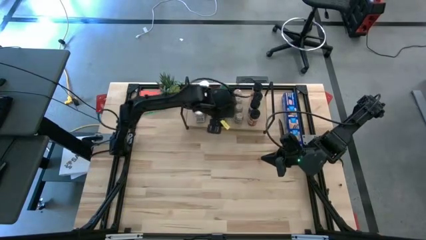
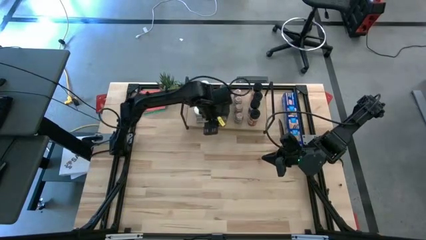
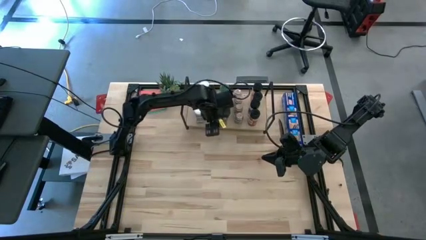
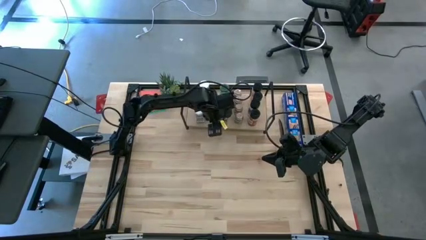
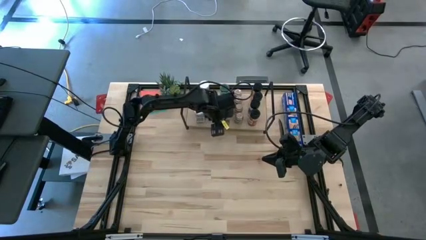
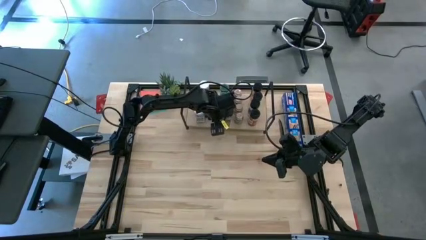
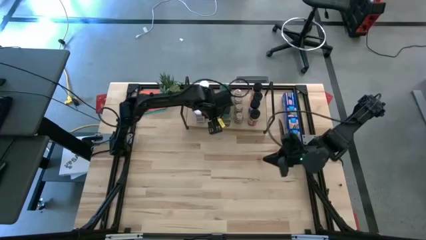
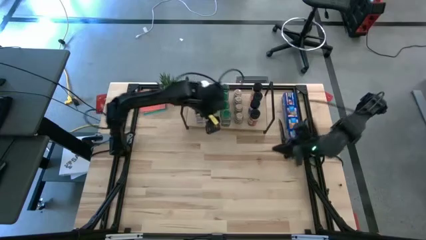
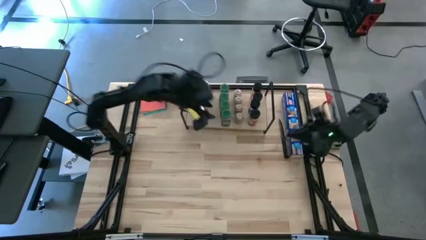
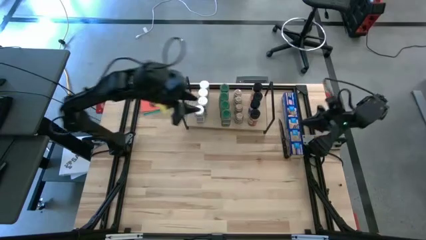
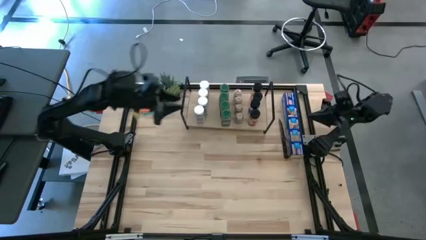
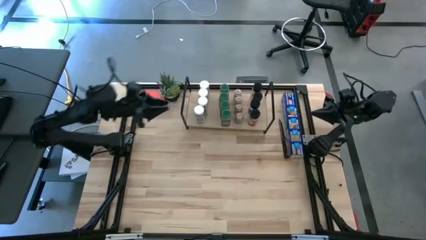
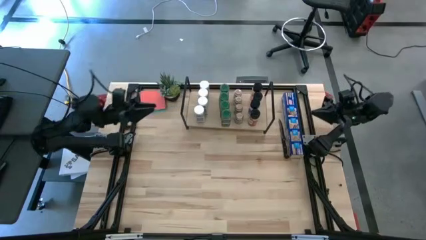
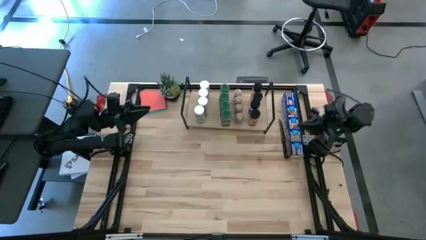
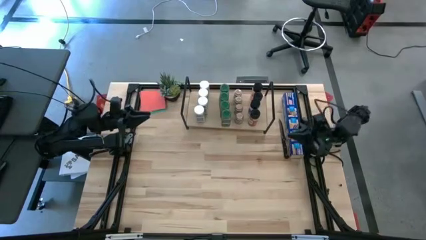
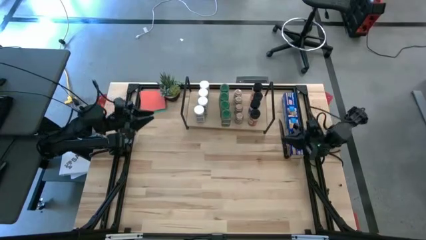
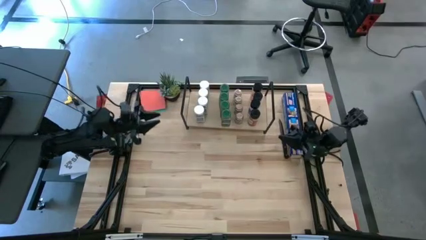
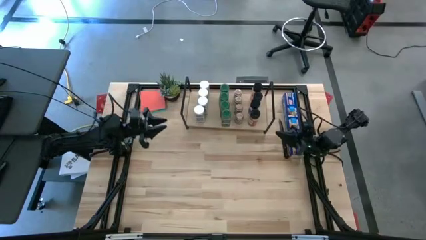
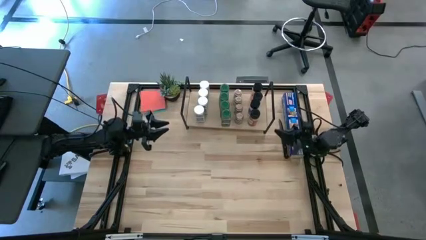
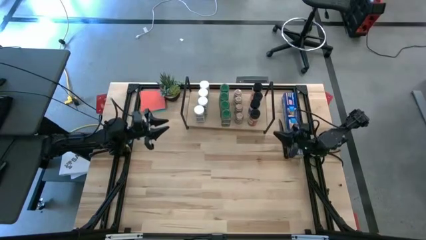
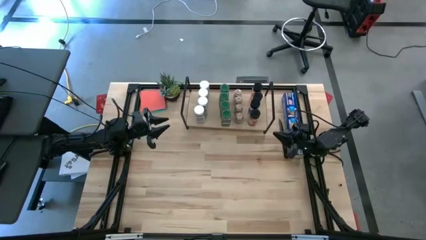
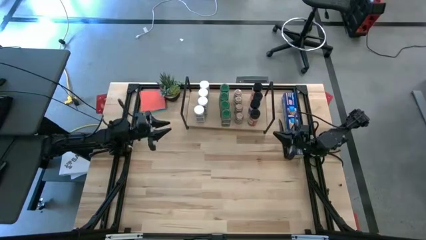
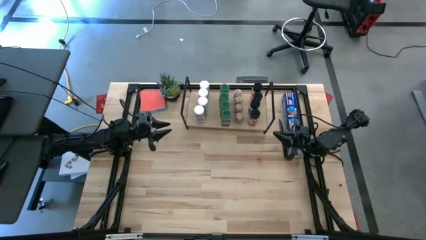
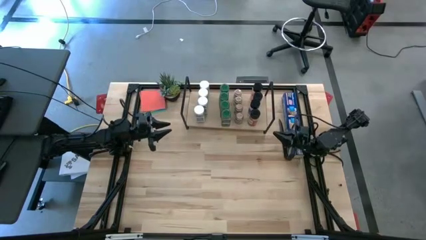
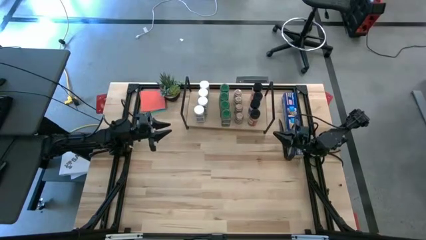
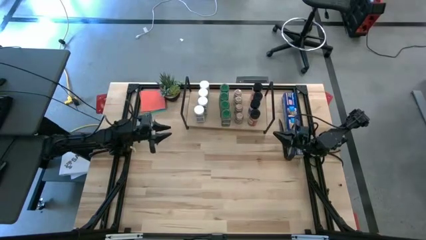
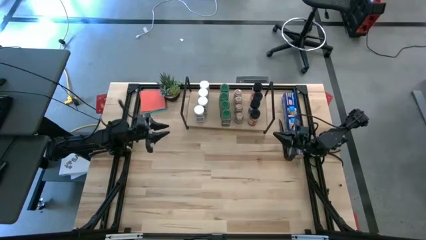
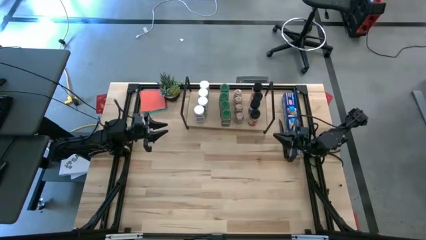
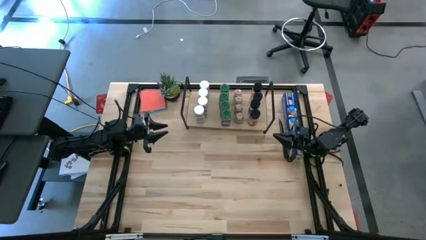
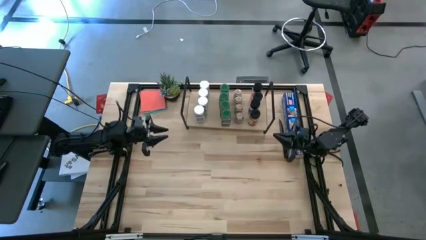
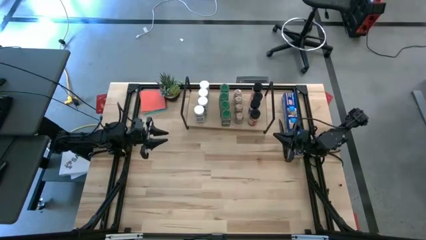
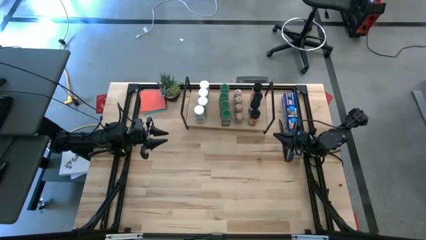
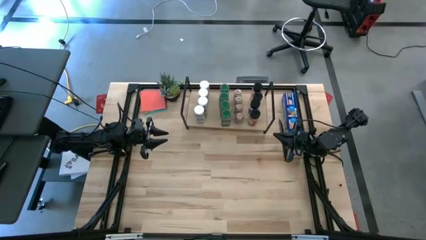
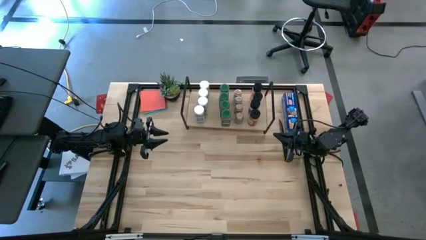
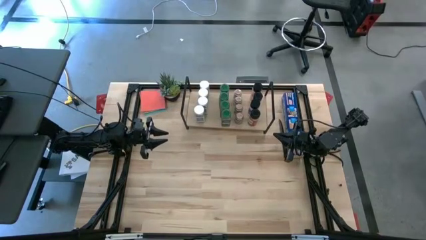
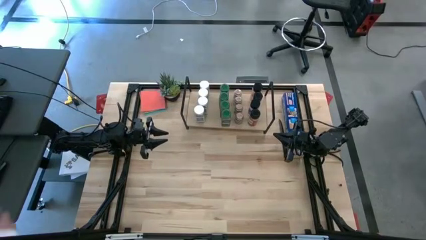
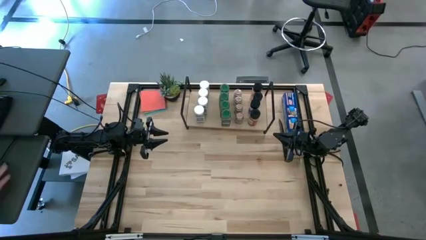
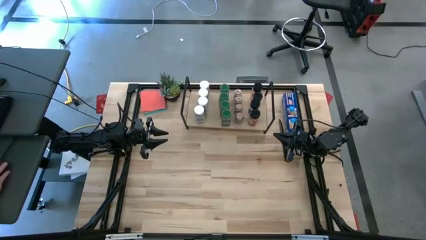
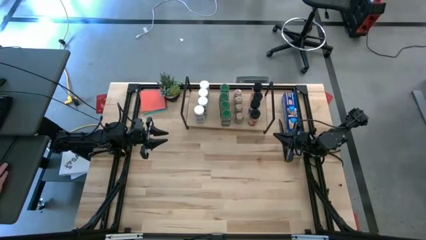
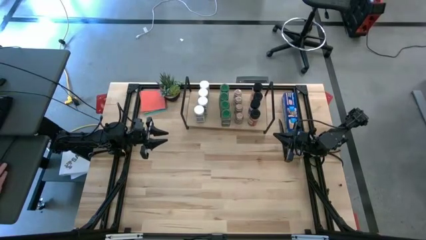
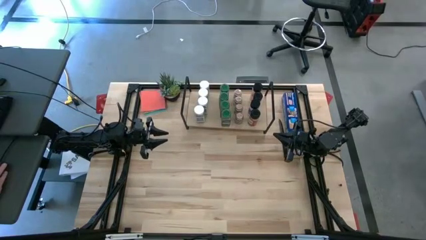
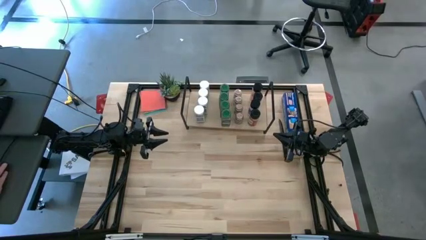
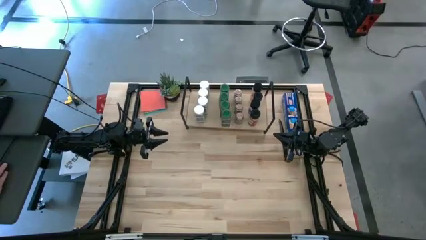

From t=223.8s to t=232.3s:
Task: Shelf spices
Return to Home Position

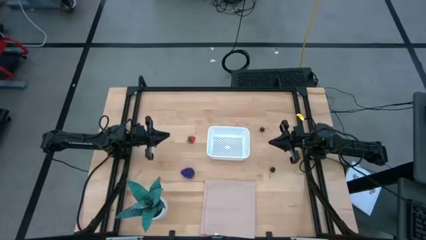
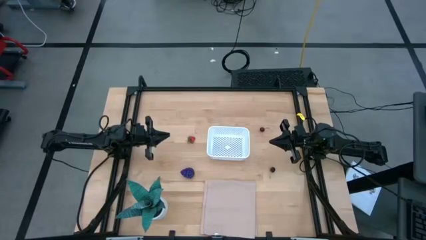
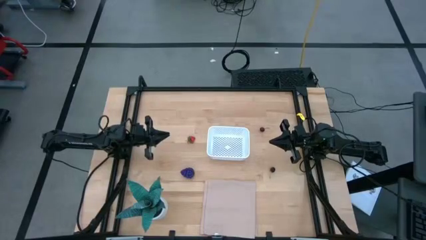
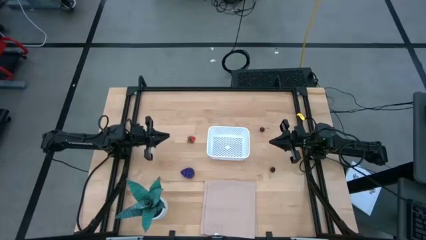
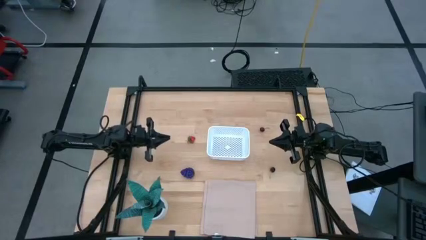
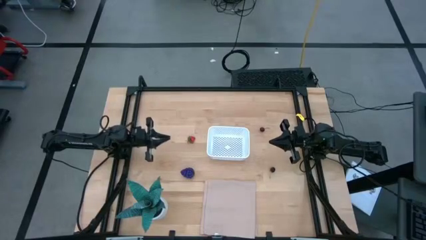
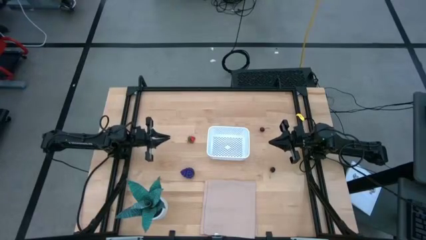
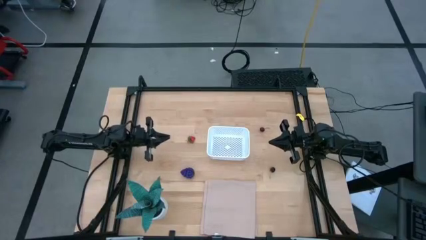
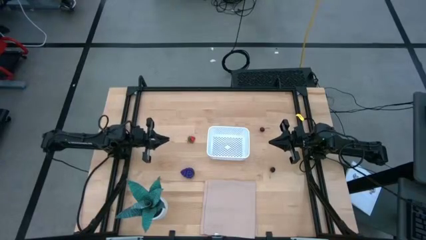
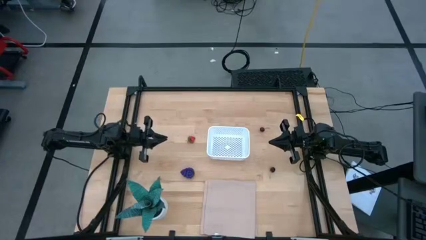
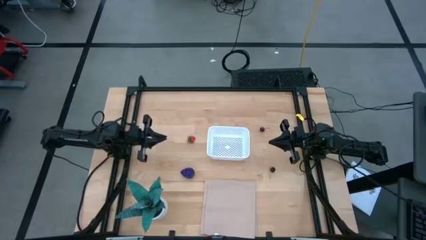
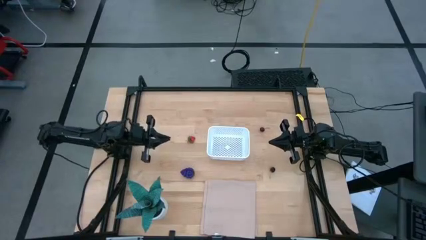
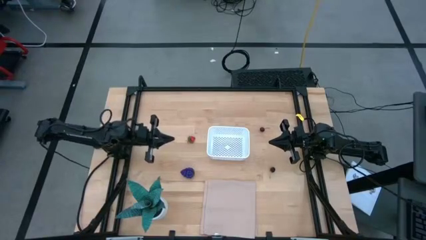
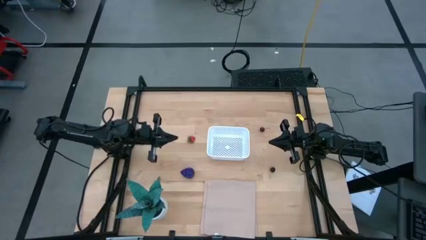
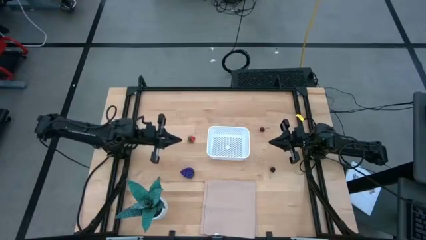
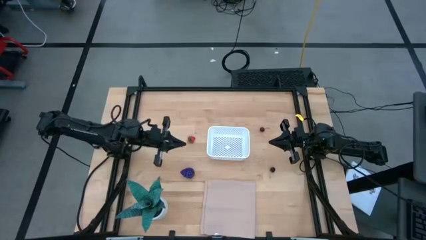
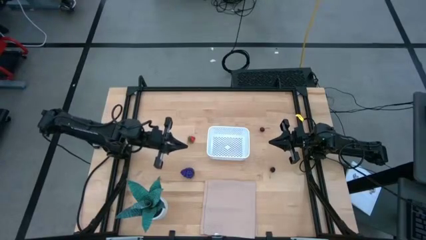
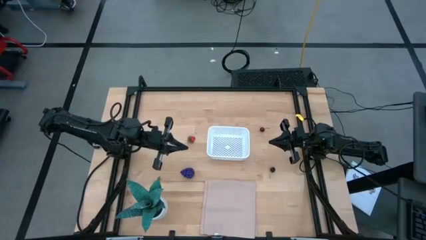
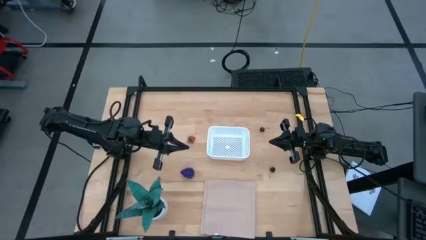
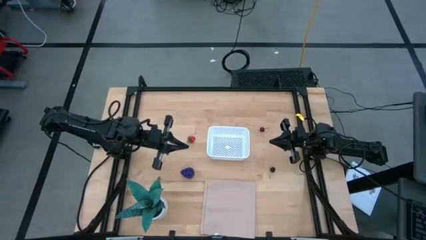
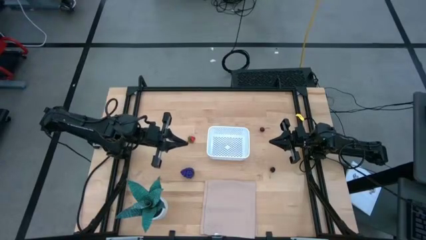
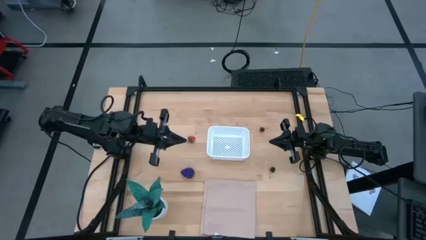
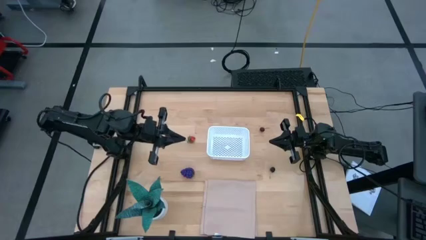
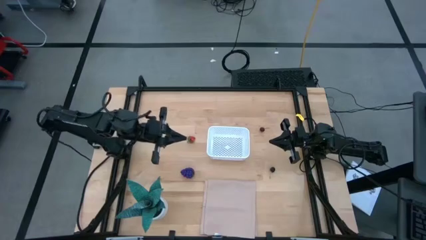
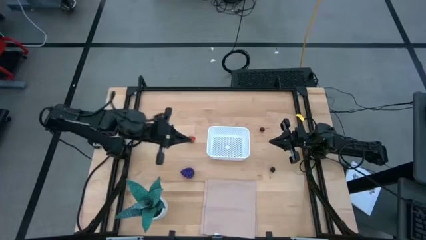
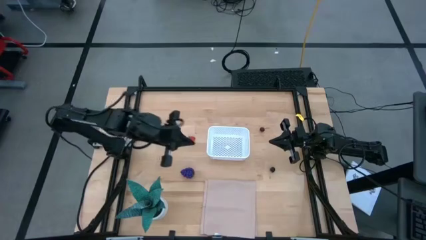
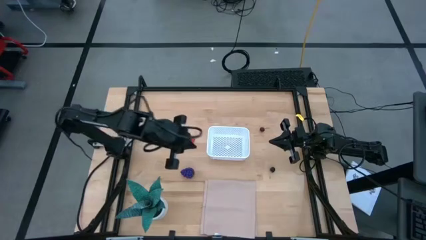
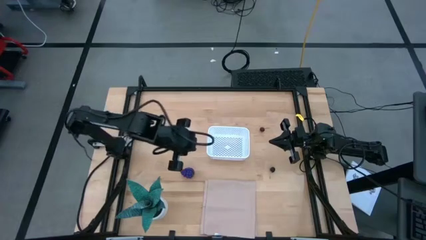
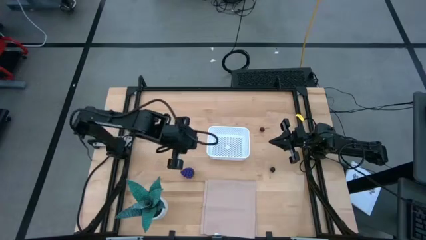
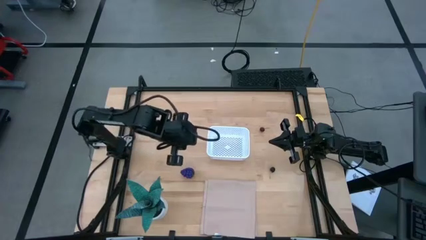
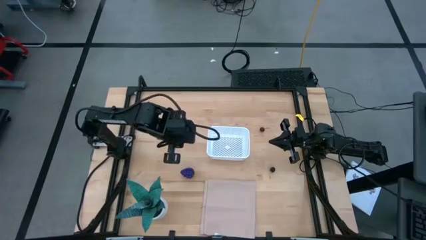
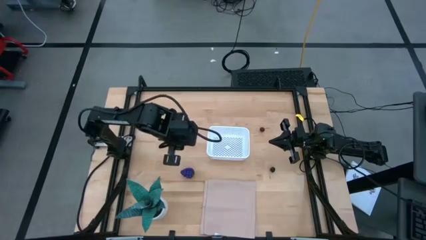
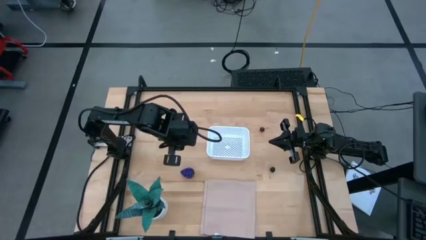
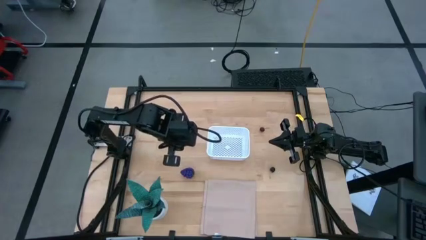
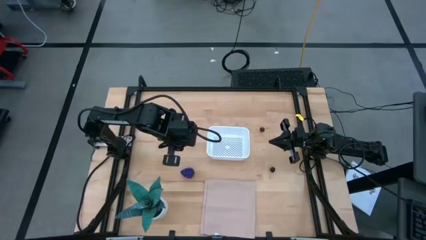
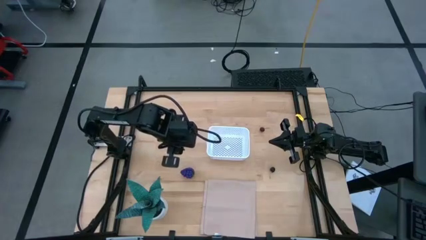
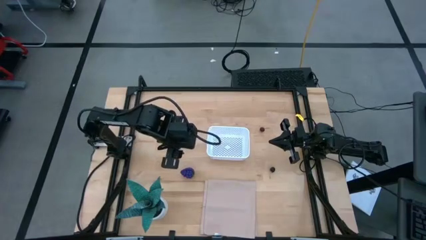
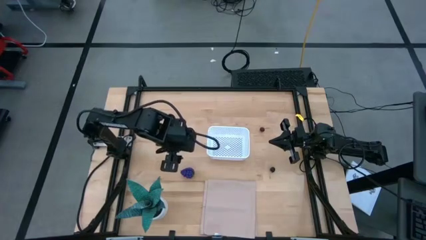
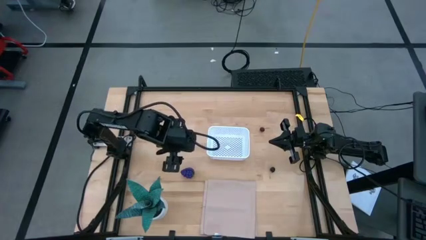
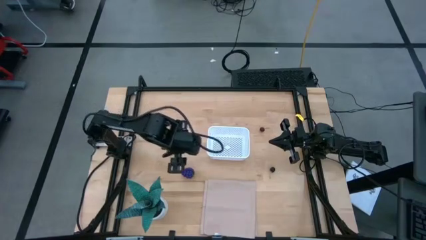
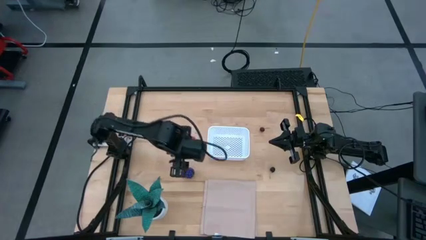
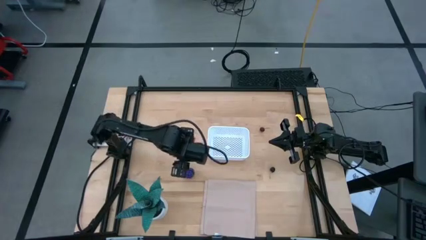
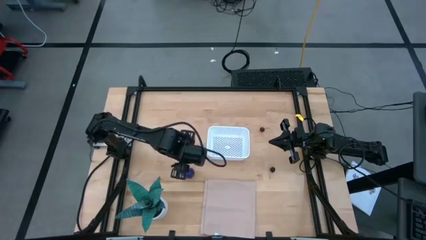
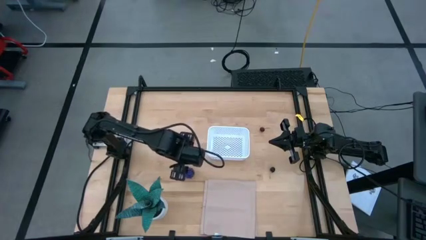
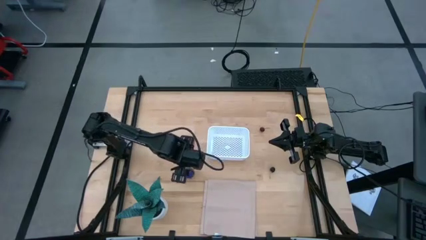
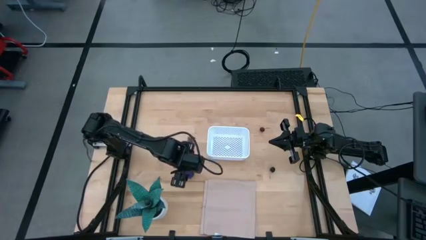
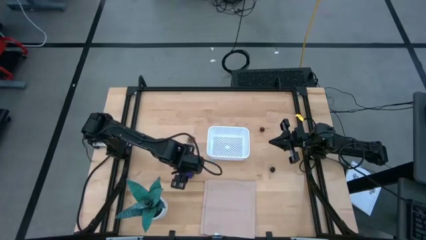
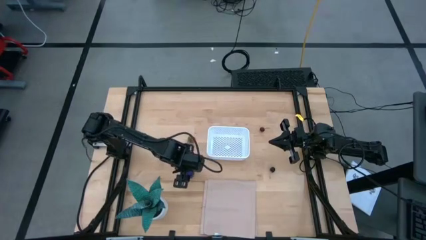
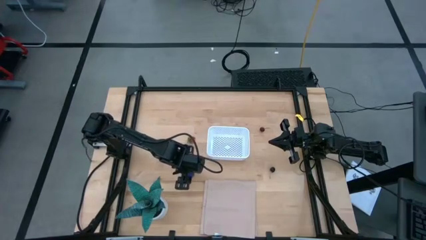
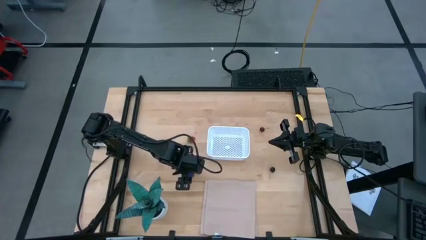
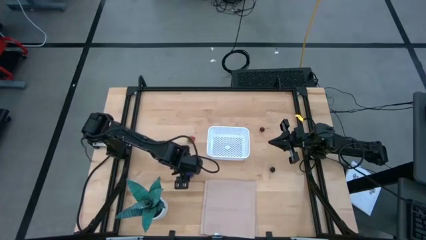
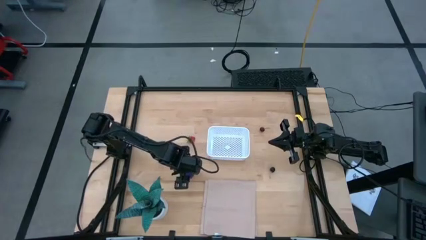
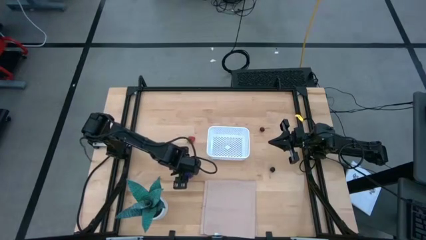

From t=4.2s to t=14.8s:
Task: Pick and placing Produce into tupperware
Put the grapes into the white bin
